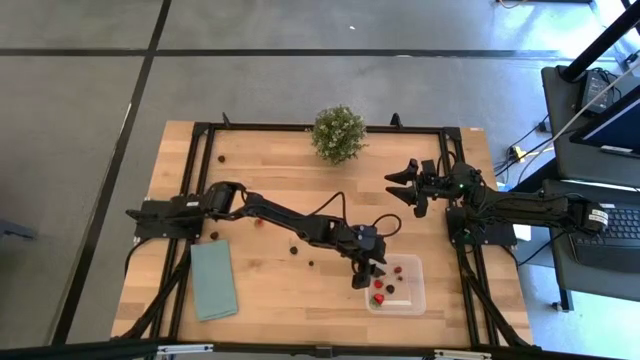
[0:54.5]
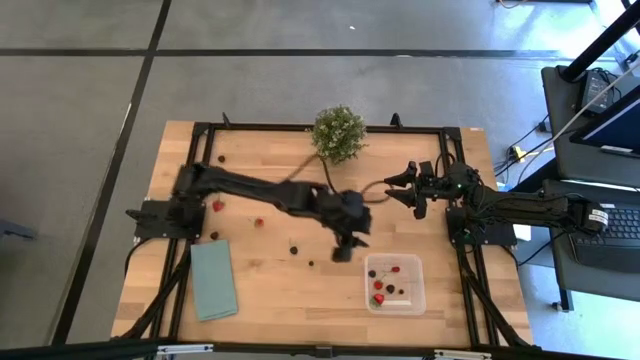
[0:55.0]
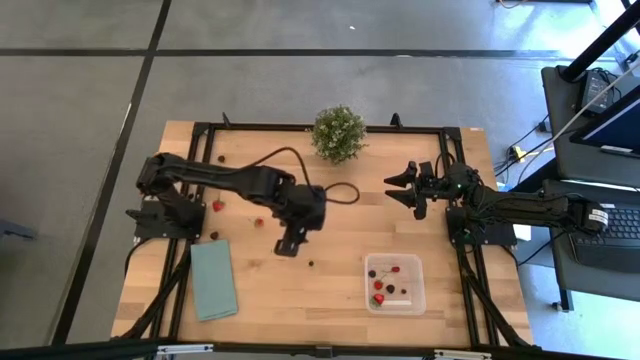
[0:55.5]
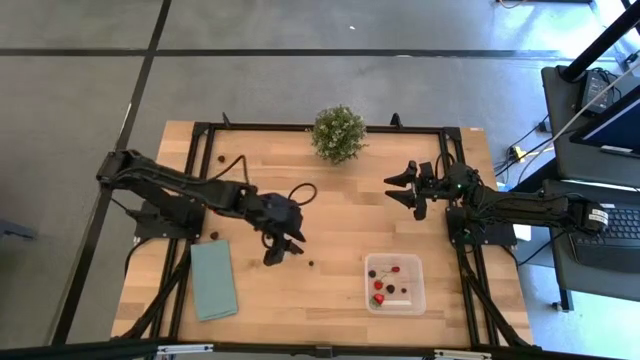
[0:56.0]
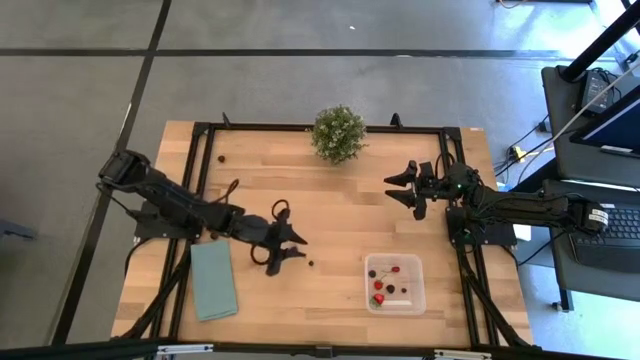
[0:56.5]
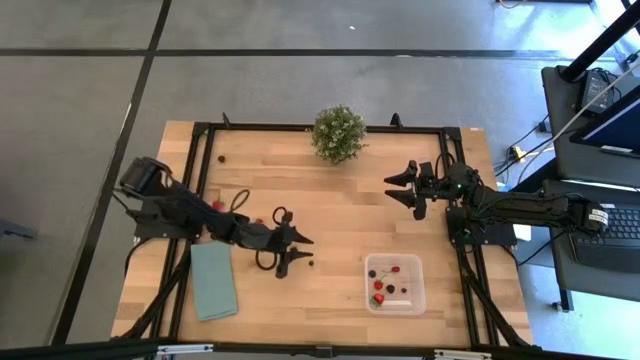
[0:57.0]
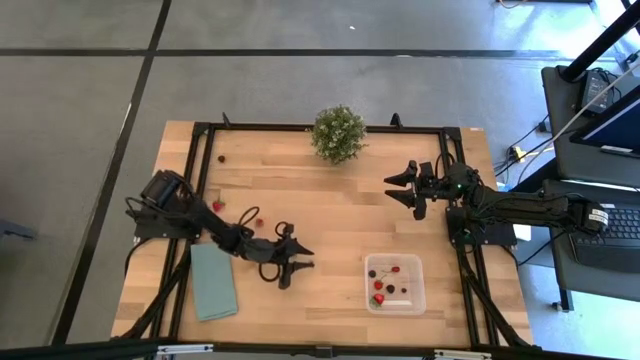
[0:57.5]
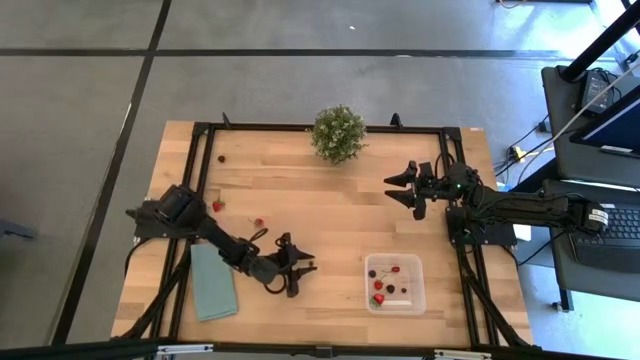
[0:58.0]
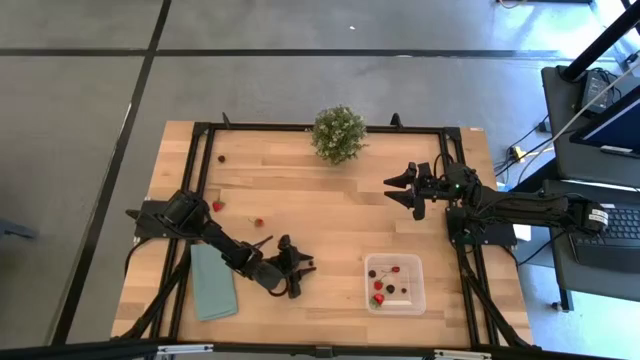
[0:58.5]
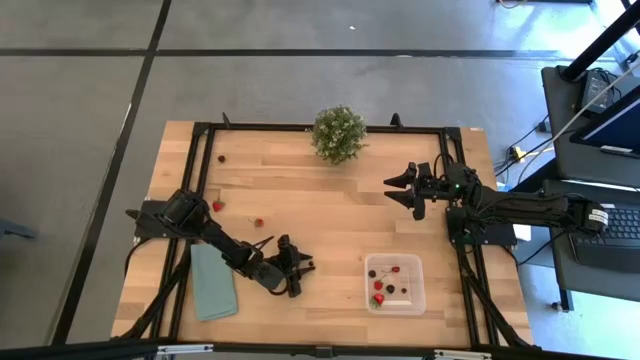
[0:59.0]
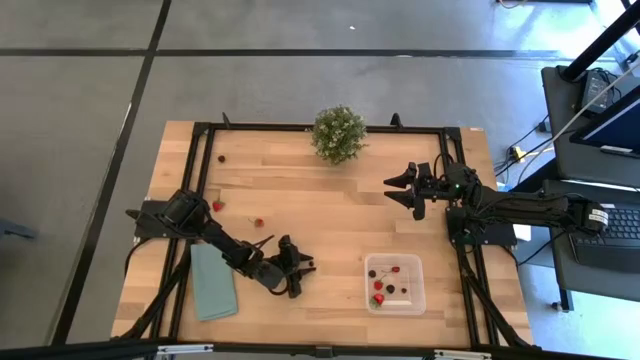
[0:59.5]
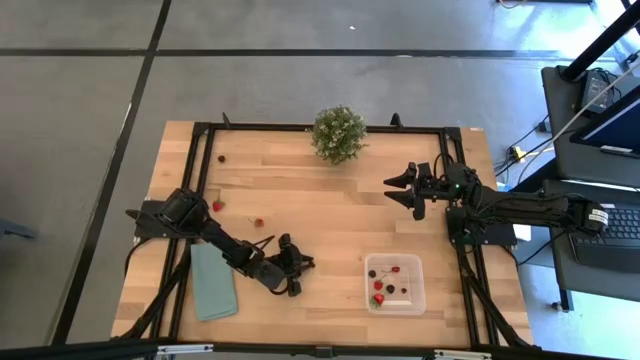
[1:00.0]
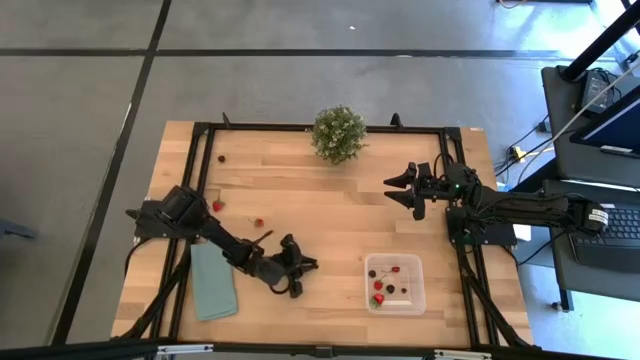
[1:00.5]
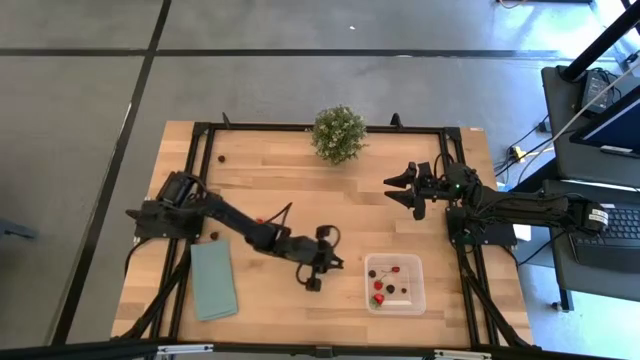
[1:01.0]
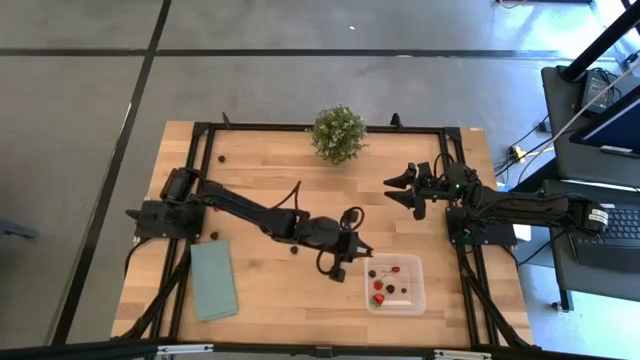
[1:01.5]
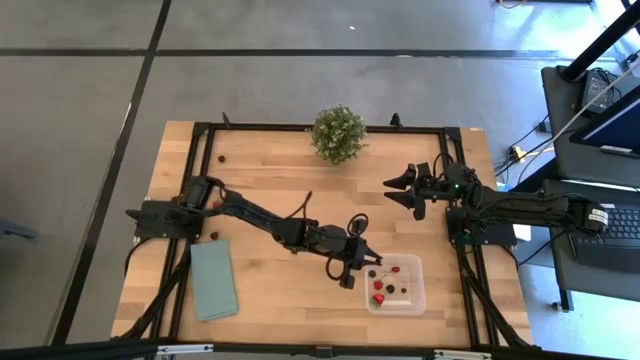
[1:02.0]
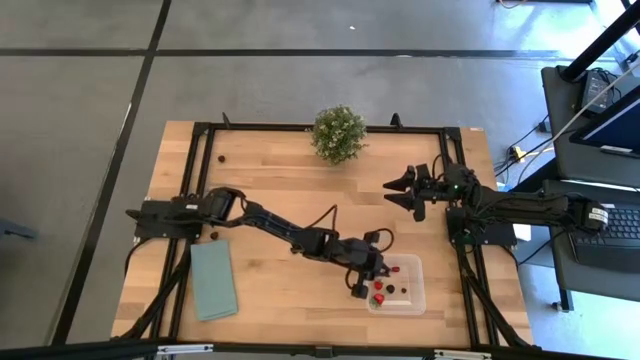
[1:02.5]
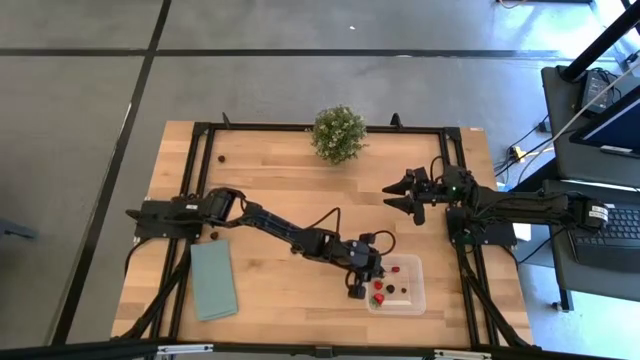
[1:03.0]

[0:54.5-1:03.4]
Task: Pick and placing Produce into tupperware
Put the blueberry into the bin

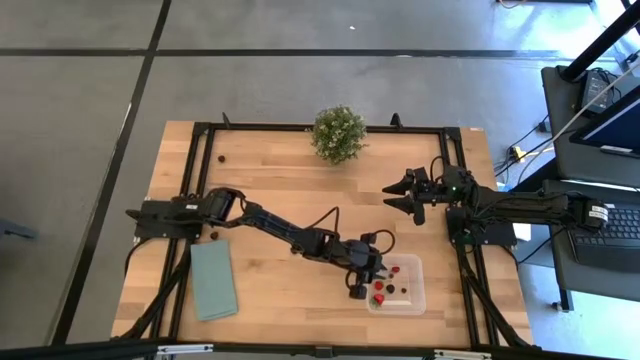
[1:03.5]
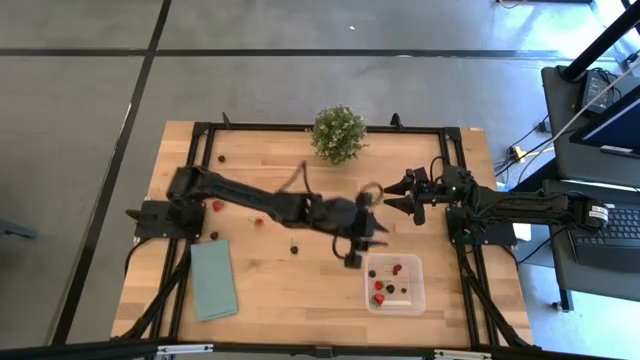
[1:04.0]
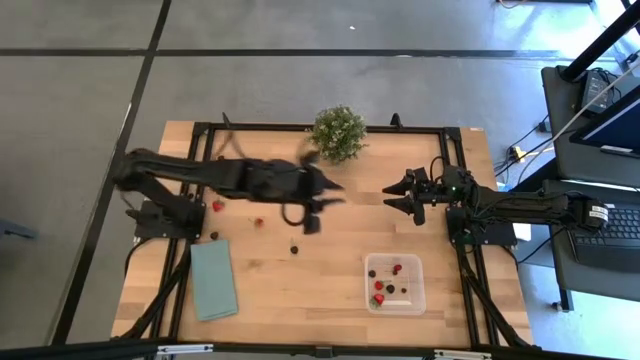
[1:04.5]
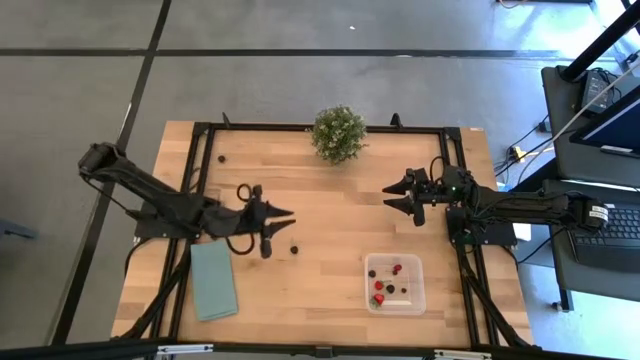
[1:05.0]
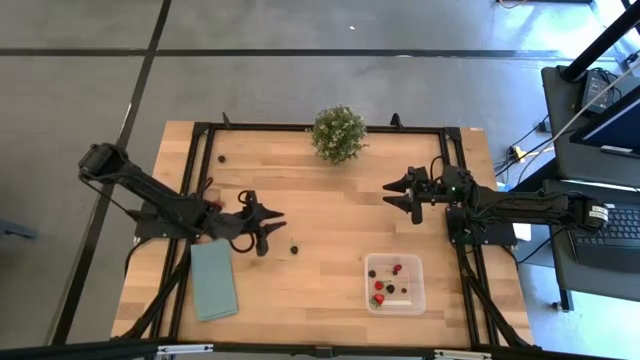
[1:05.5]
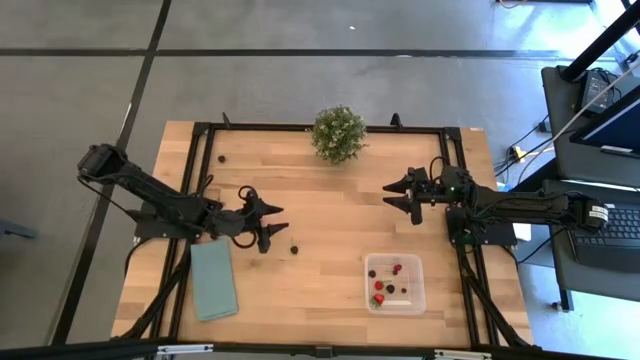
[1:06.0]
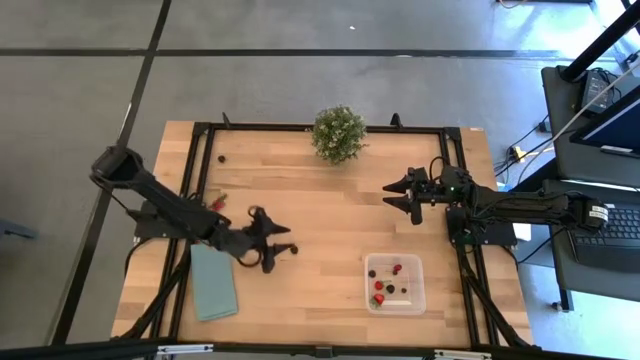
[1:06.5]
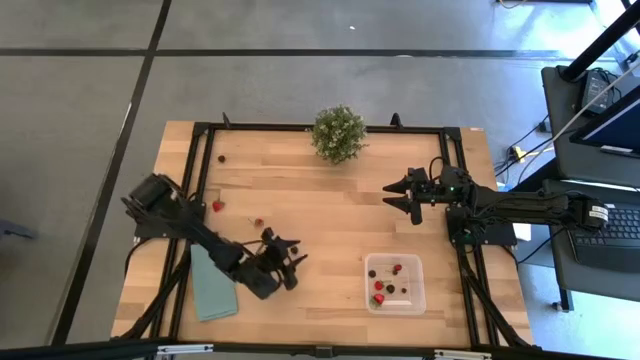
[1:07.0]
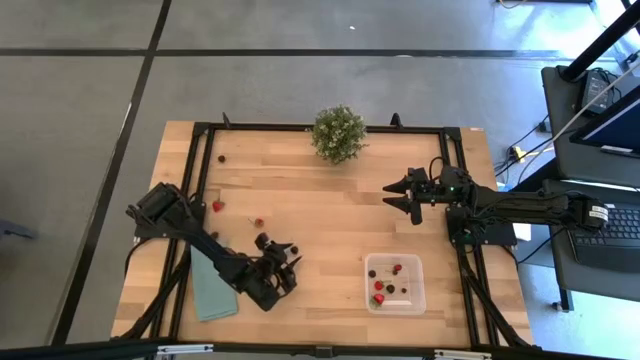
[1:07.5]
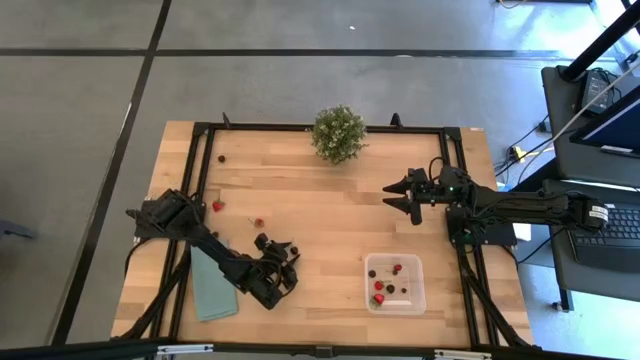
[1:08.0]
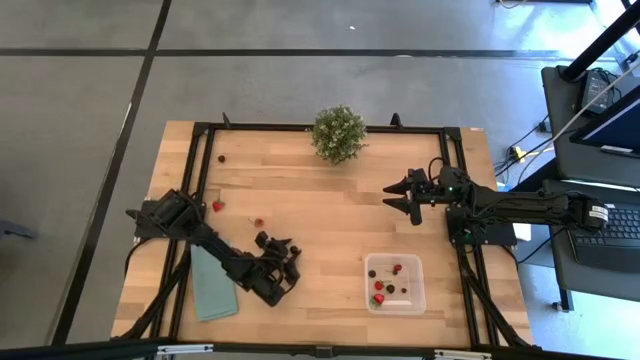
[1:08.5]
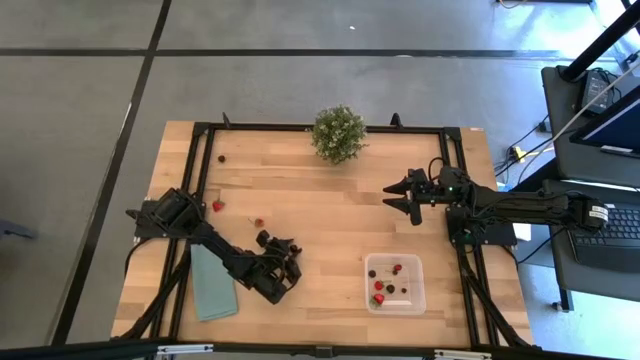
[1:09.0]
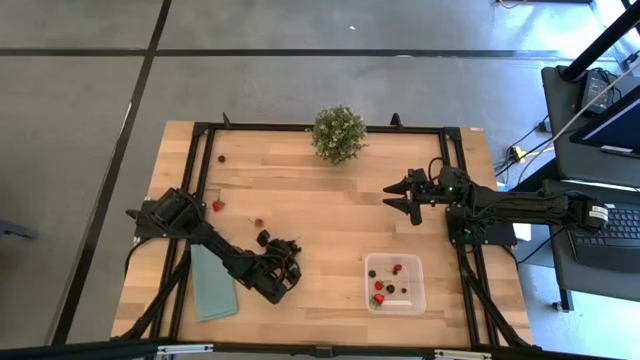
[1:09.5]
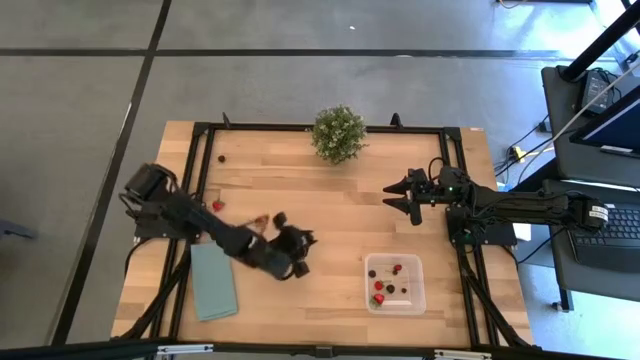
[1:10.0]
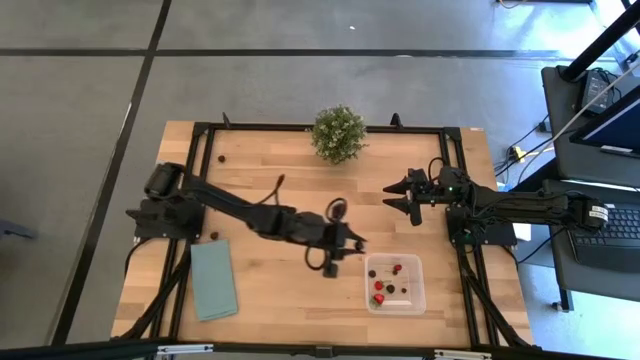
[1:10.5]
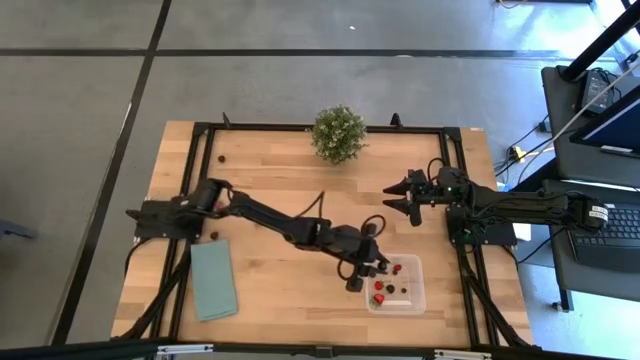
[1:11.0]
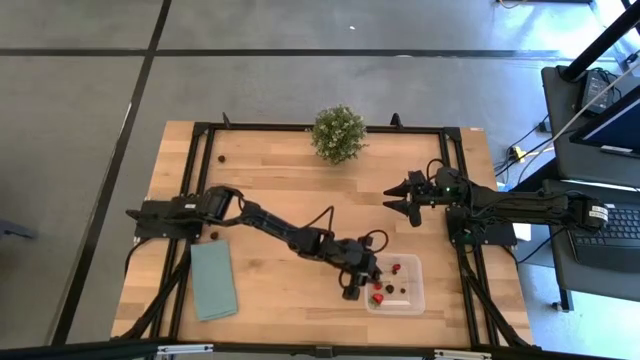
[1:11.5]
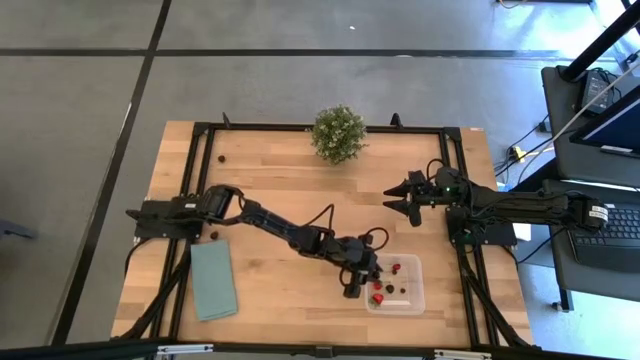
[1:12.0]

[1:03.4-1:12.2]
Put the bottom black cherry into the bin

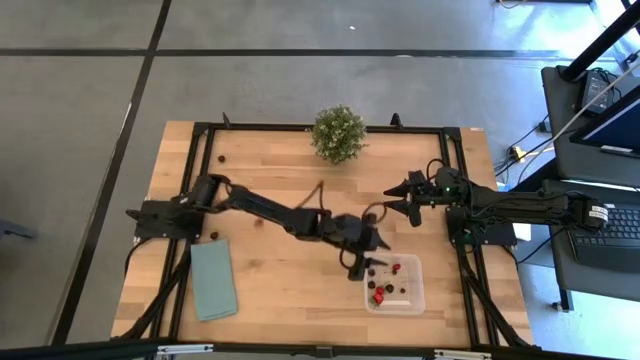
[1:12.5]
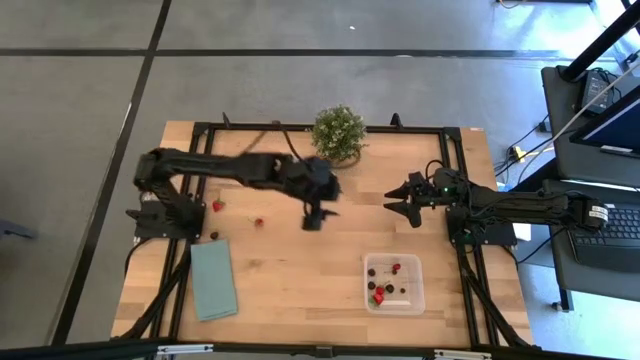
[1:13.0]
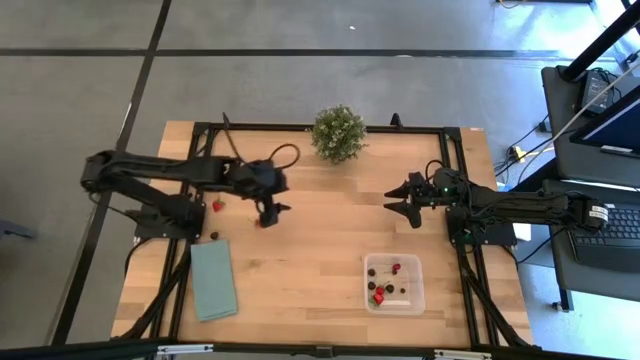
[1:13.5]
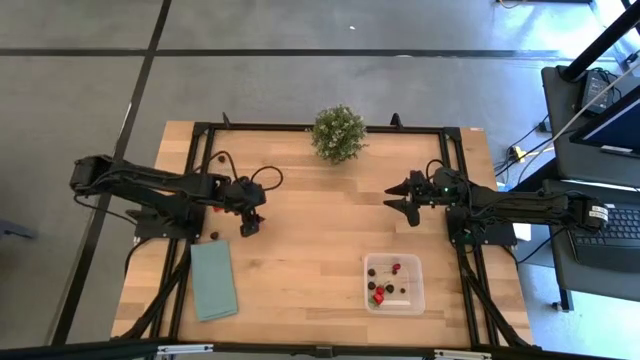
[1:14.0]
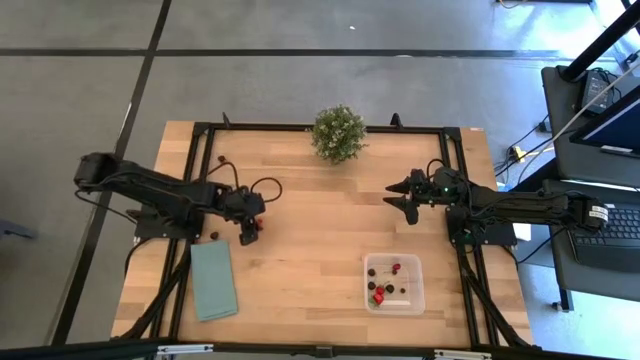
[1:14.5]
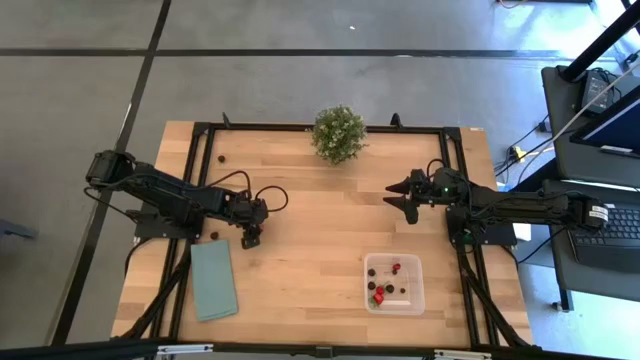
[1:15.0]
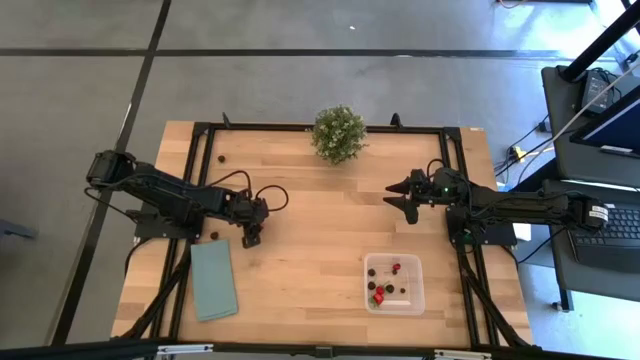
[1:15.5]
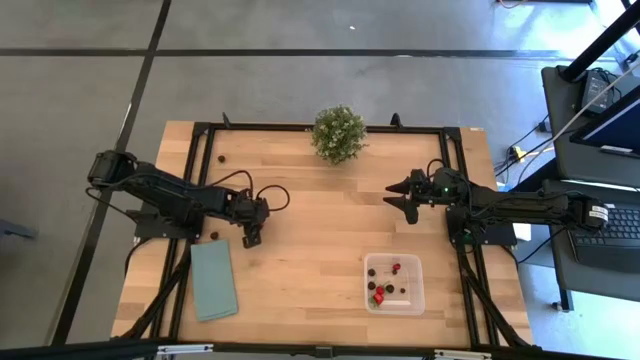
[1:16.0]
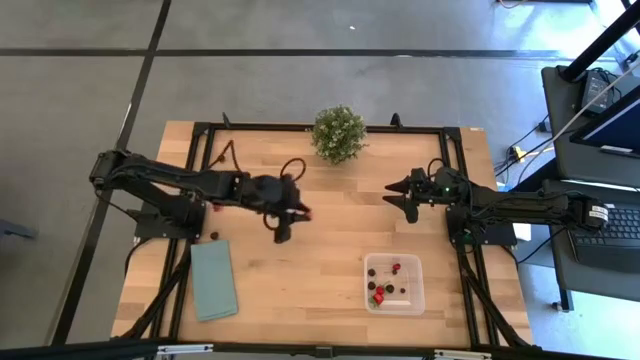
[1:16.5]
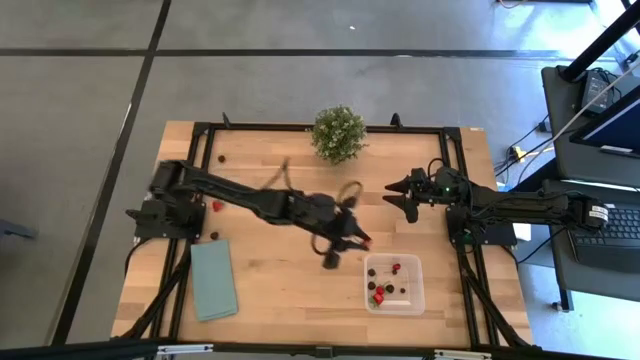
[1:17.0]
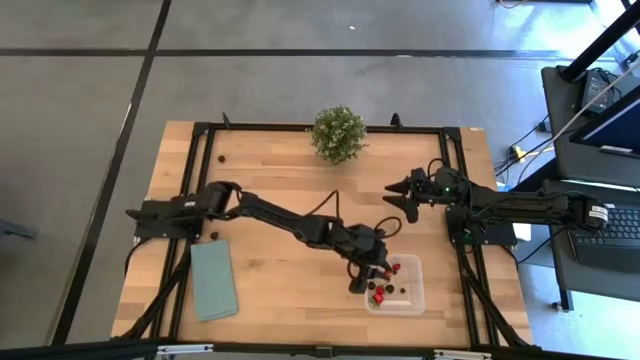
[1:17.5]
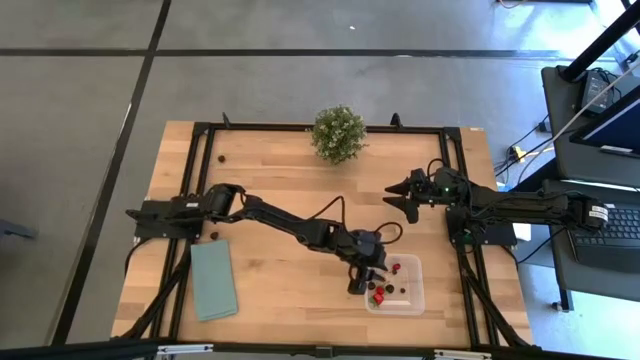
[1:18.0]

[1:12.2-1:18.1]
Put the bottom strawberry into the bin
